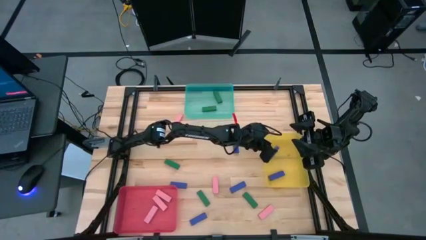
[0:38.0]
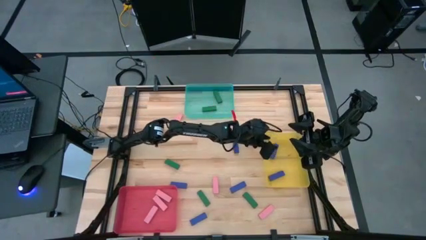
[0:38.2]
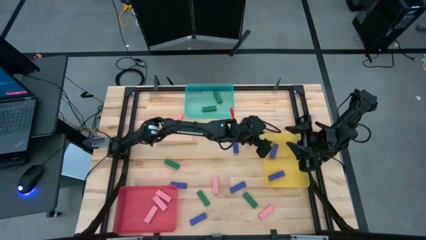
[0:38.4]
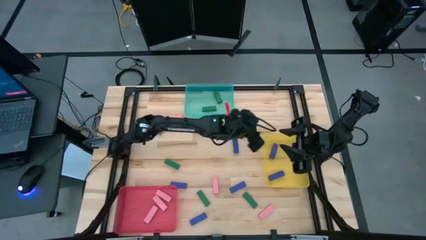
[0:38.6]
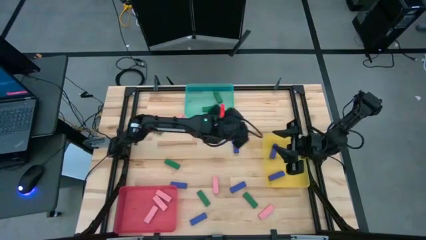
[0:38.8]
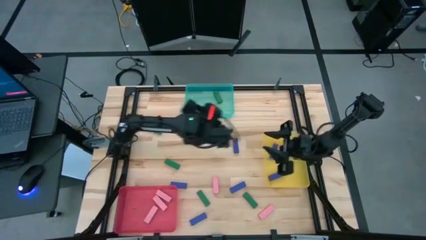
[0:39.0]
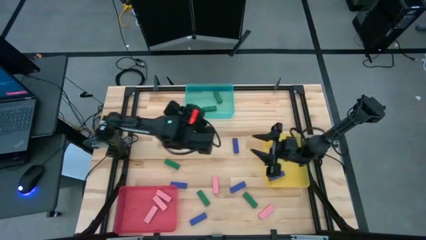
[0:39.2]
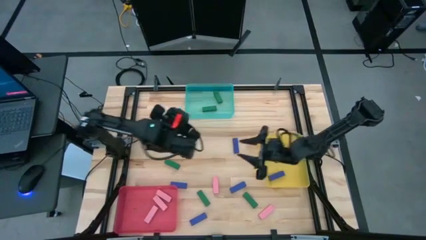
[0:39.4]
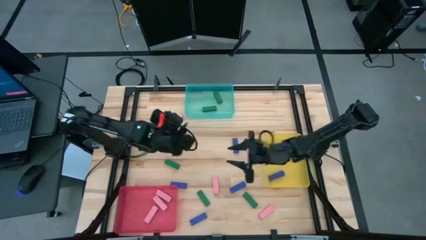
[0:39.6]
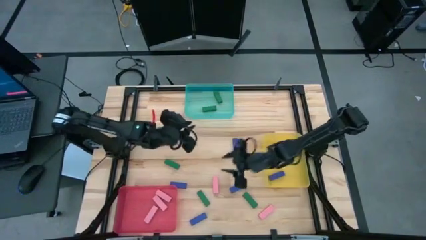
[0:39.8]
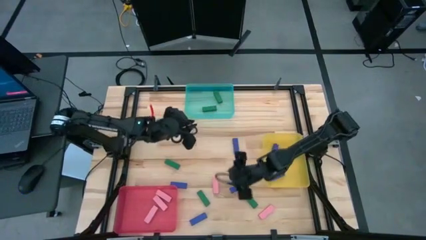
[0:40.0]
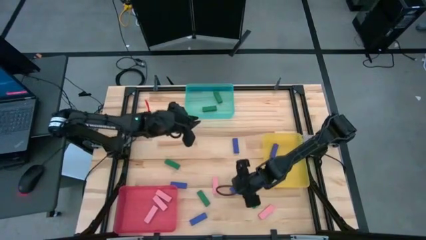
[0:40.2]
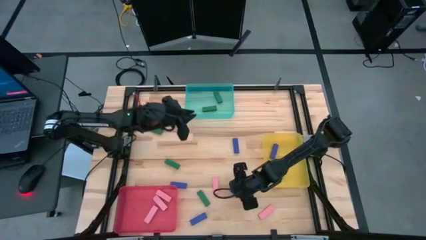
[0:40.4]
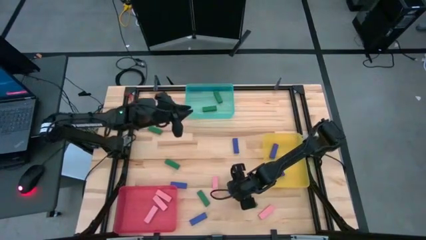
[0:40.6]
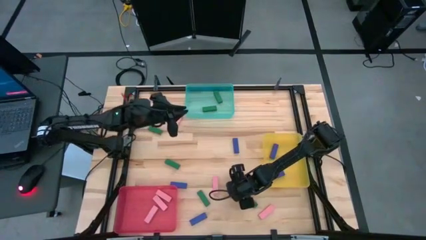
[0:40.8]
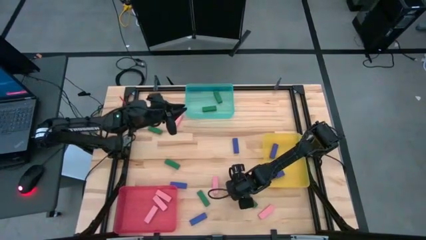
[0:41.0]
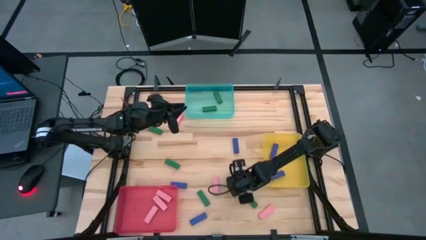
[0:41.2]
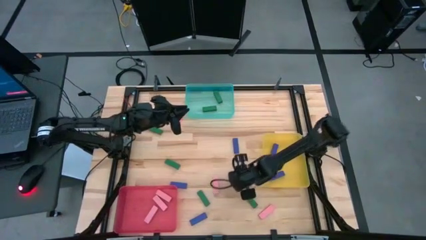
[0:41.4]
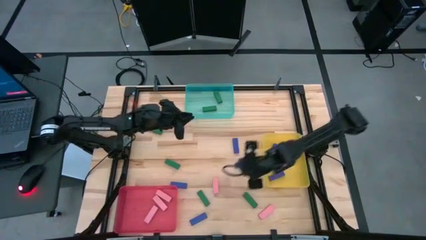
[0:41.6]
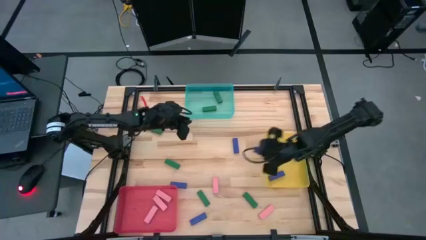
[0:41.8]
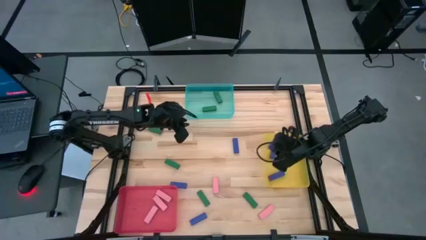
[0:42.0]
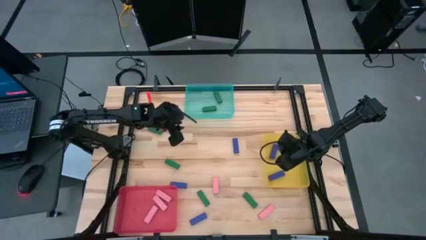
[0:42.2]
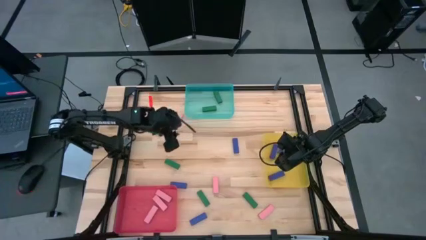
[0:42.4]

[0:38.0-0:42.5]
Task: Sort blocks
Put the blue block into the yellow bin

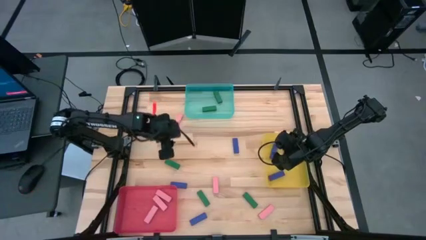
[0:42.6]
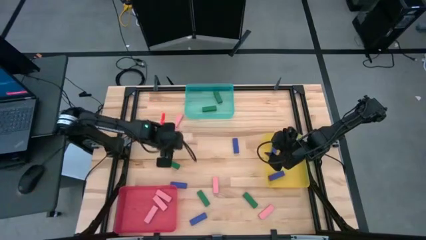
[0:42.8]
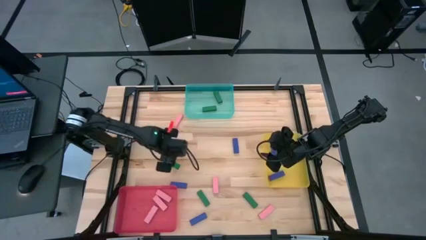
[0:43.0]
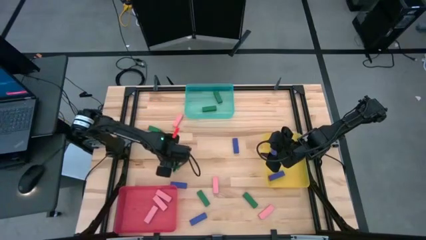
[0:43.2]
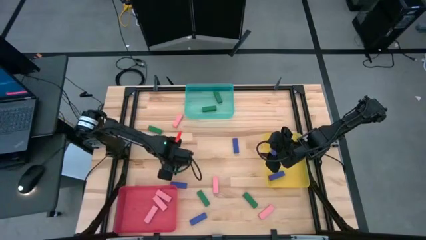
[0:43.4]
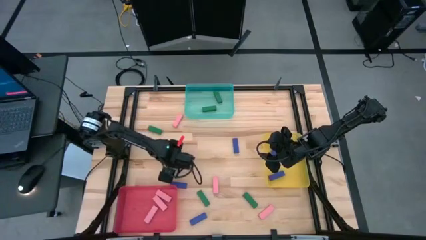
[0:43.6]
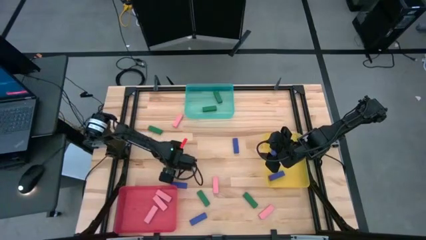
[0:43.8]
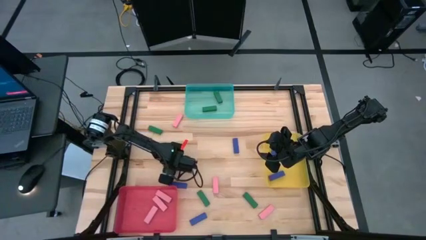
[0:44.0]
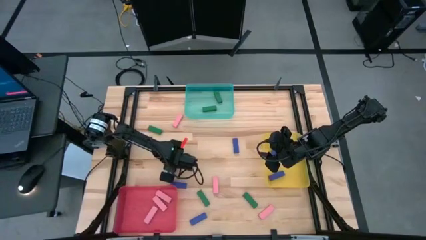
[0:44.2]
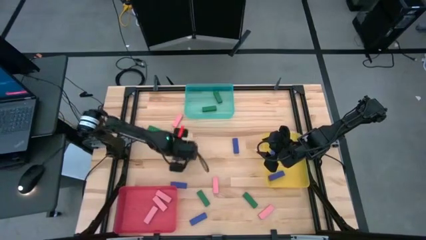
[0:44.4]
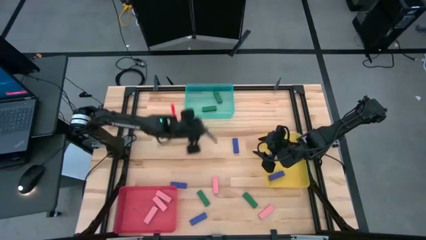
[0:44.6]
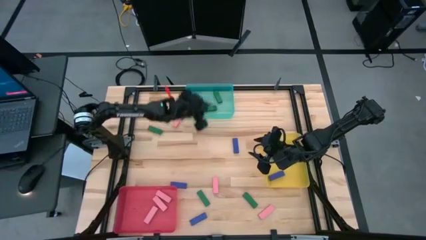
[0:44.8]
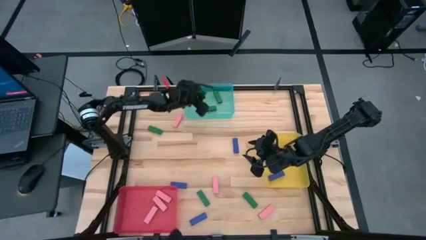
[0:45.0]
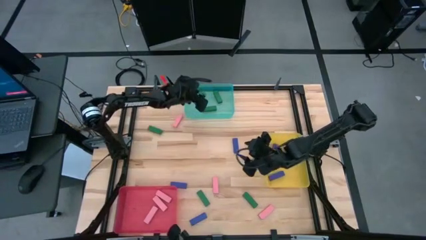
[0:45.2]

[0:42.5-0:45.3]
Put the green block into the blue bin

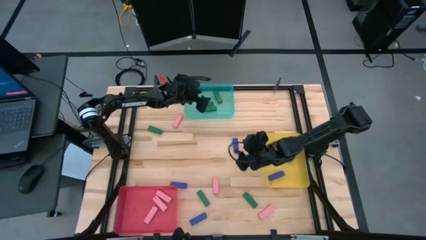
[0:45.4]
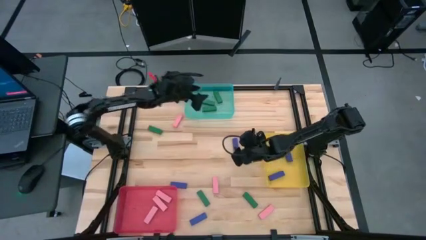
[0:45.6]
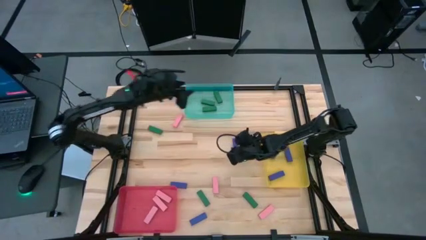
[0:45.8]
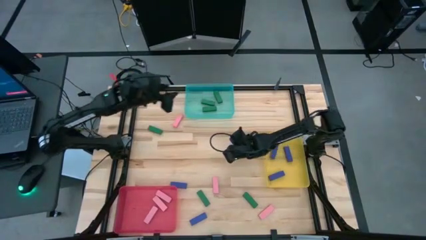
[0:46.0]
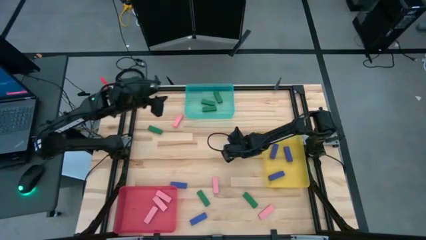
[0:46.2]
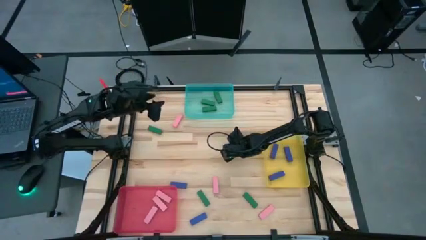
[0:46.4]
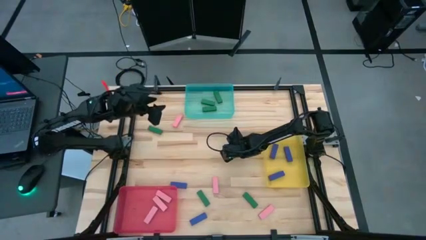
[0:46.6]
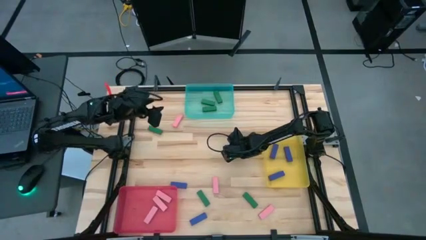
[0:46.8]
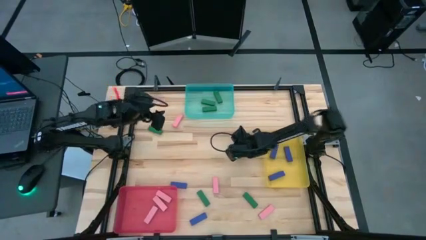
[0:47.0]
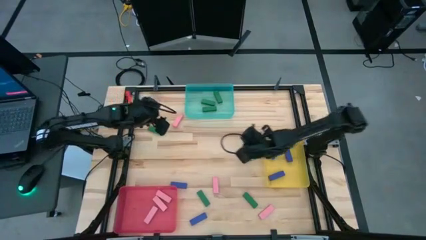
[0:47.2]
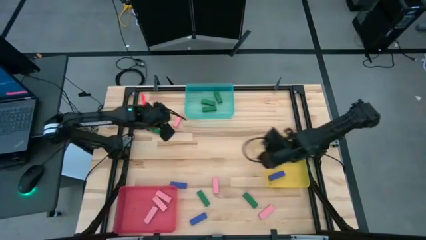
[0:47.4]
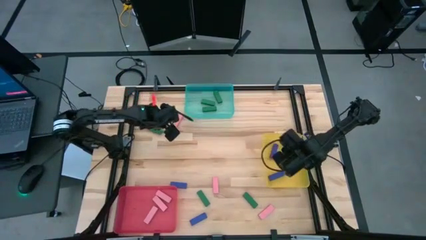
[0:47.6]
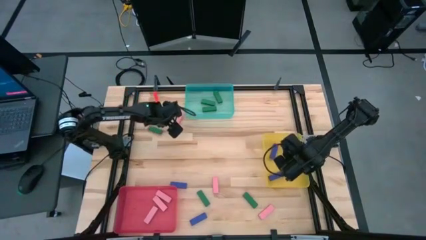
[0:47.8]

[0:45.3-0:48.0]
Put the blue block into the yellow bin

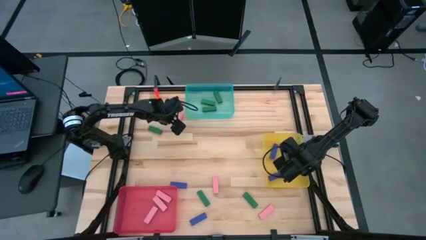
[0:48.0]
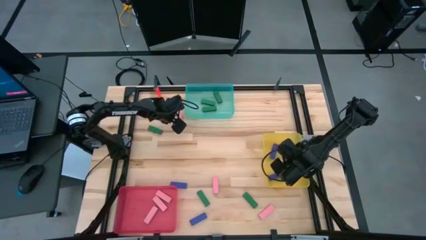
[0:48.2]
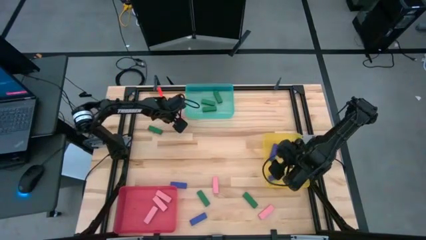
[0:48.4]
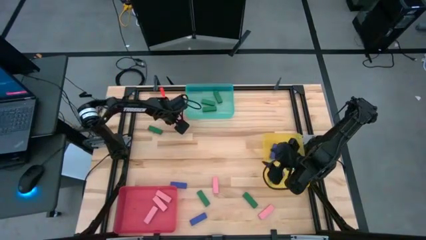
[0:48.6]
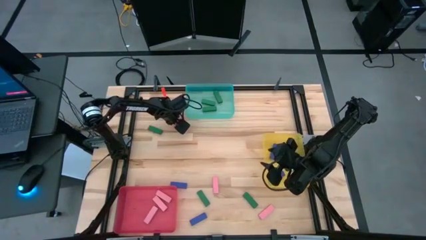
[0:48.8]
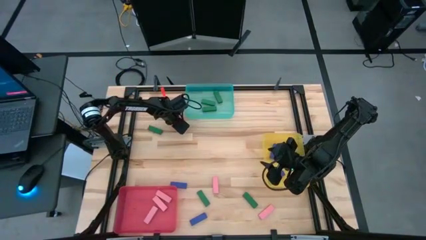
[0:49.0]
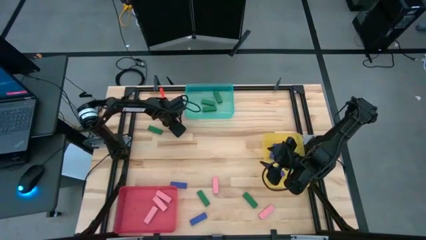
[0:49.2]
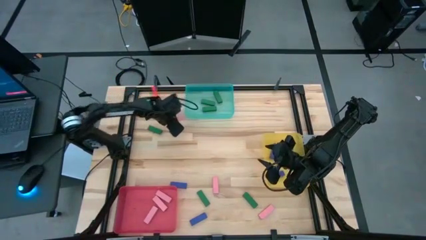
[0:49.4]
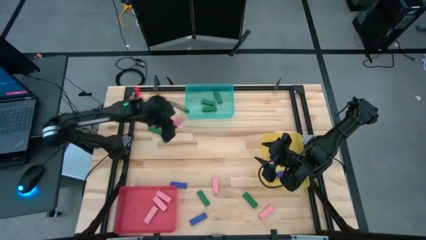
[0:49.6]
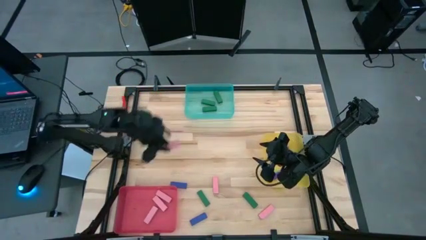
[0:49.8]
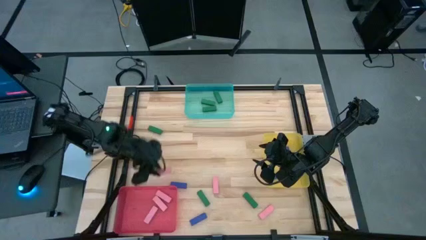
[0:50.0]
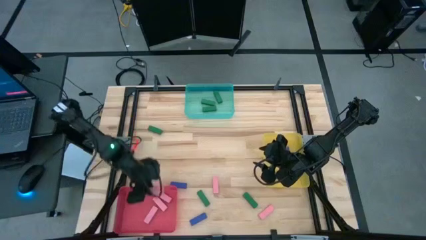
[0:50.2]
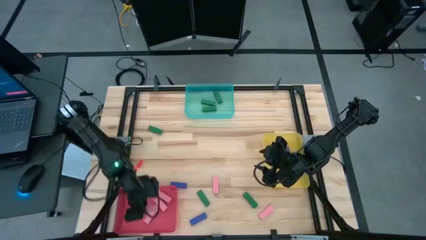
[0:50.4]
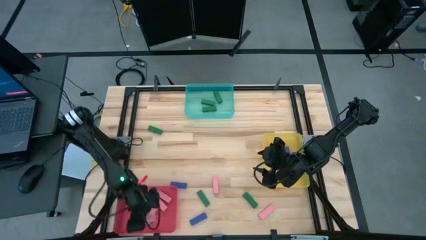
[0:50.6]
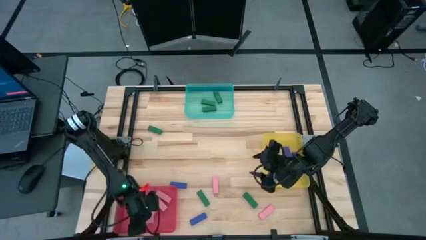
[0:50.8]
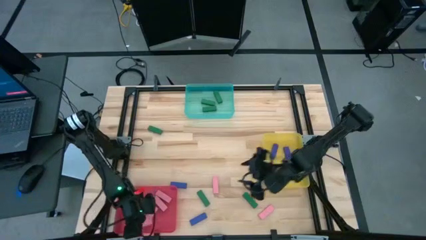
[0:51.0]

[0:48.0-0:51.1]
Put the pink block into the red bin

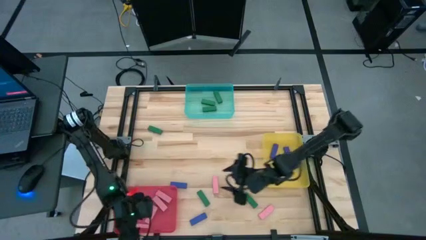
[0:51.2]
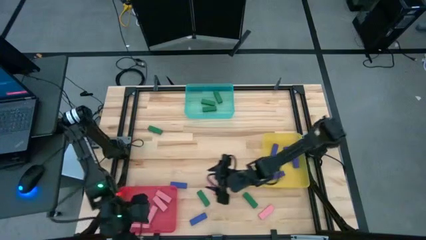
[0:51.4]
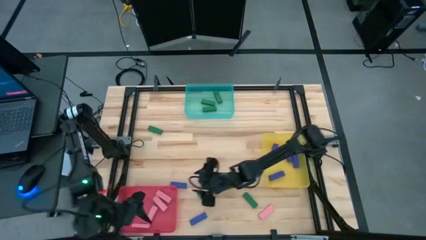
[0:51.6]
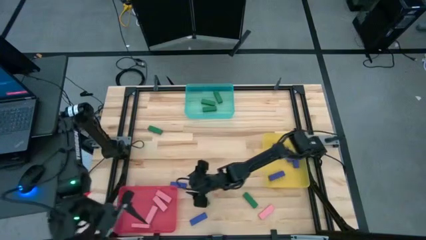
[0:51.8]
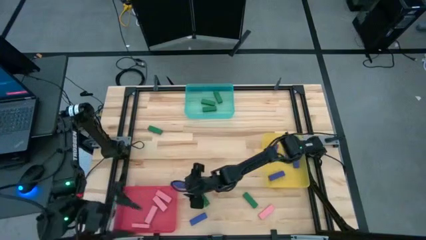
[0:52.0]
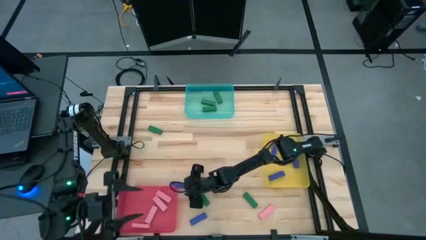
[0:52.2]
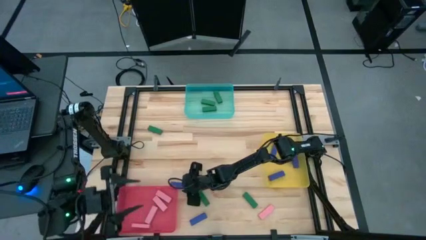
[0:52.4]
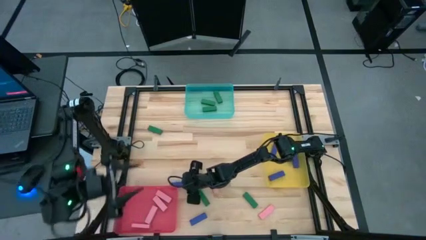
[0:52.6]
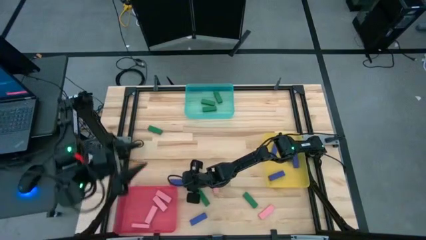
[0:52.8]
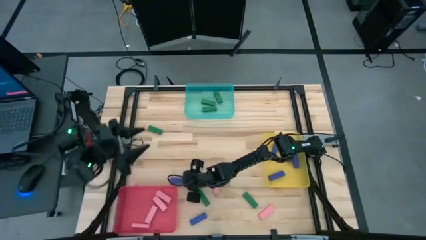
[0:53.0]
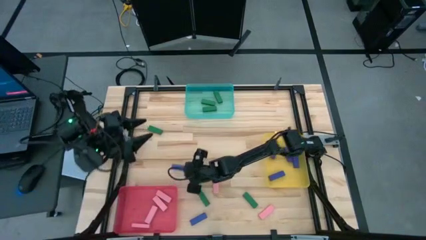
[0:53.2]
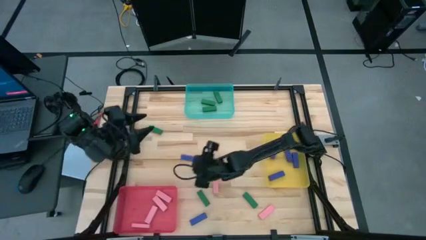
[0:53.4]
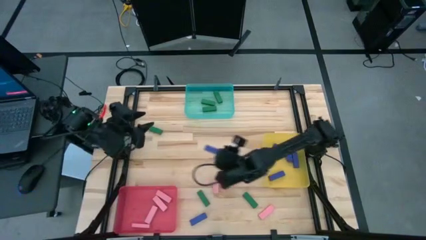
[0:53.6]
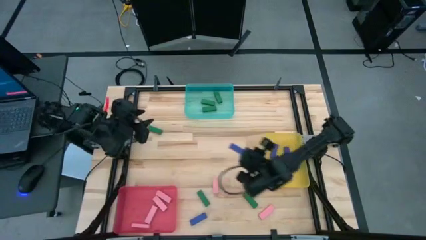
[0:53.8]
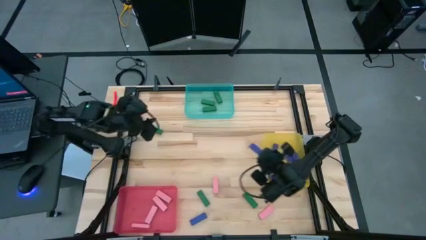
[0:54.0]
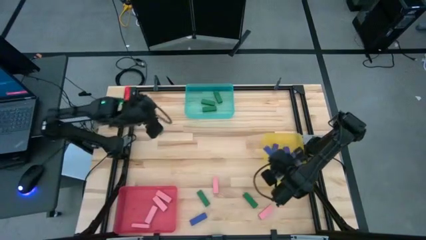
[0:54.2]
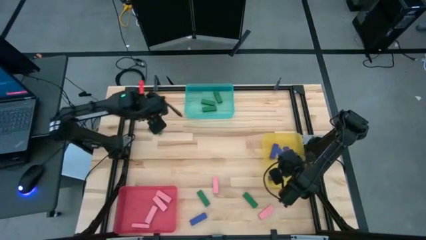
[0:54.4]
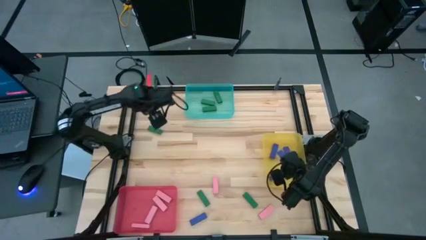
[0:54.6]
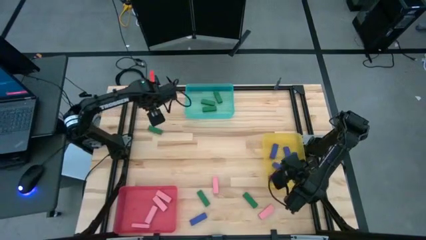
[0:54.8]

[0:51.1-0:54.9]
Put the blue block into the yellow bin
